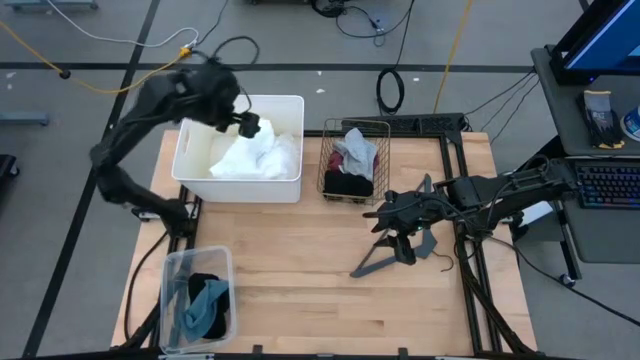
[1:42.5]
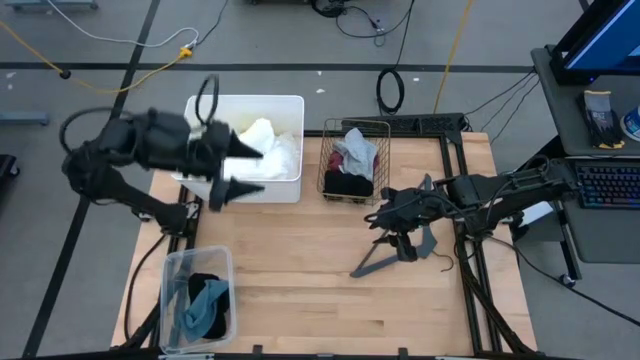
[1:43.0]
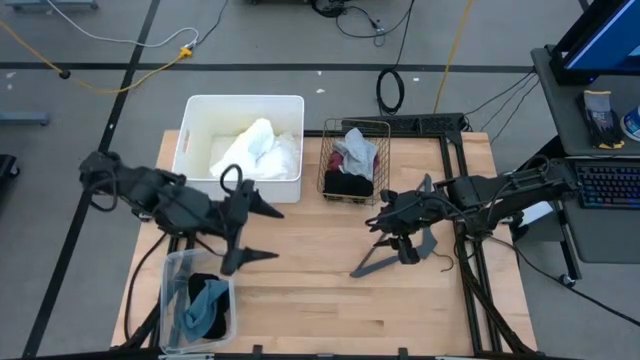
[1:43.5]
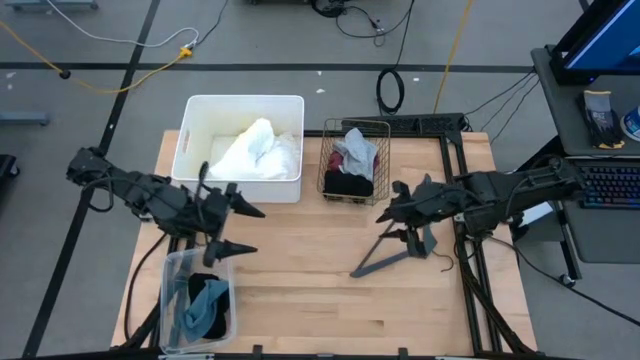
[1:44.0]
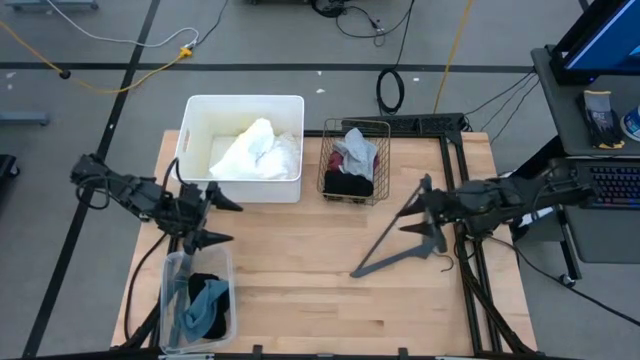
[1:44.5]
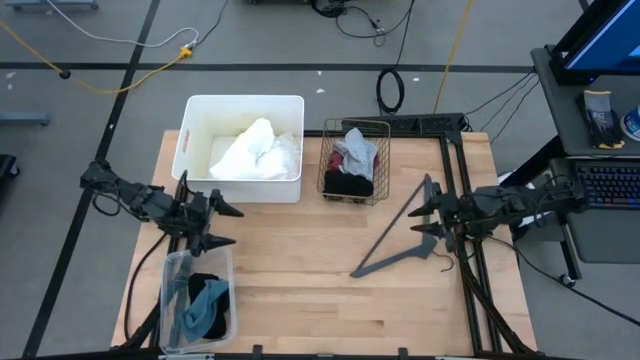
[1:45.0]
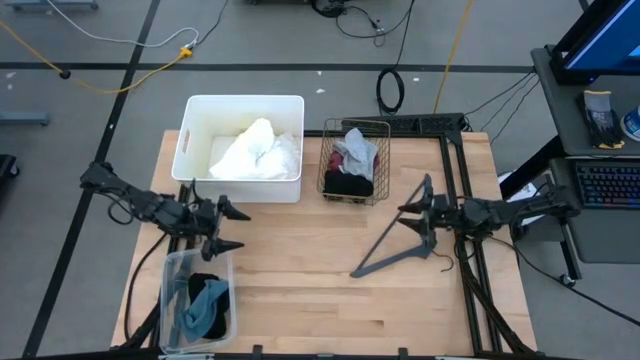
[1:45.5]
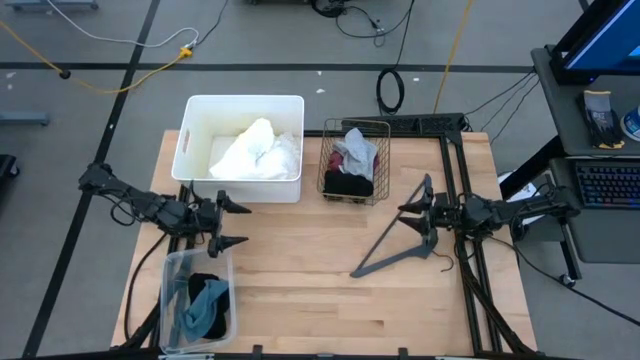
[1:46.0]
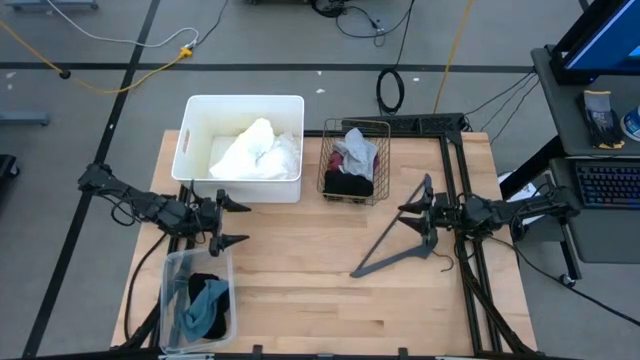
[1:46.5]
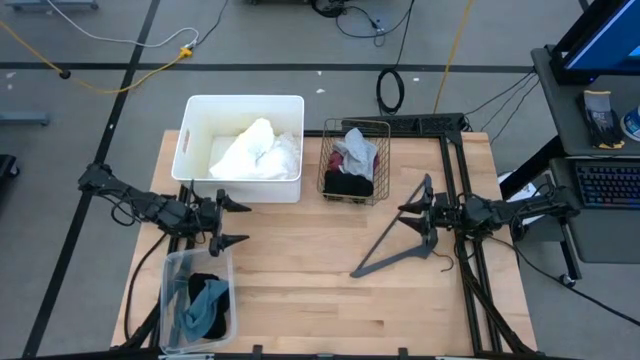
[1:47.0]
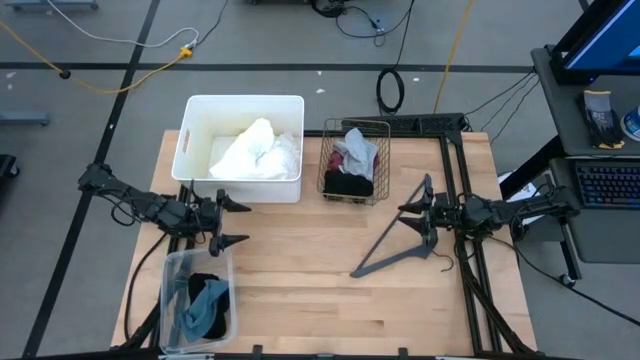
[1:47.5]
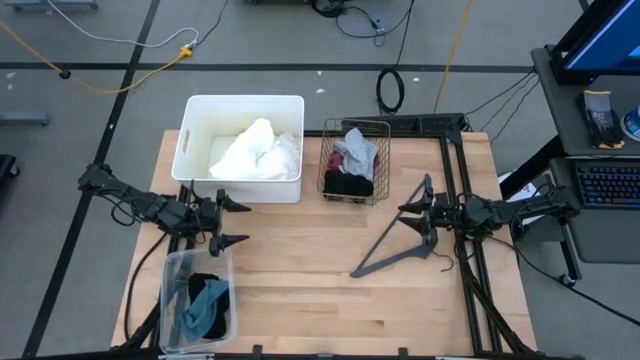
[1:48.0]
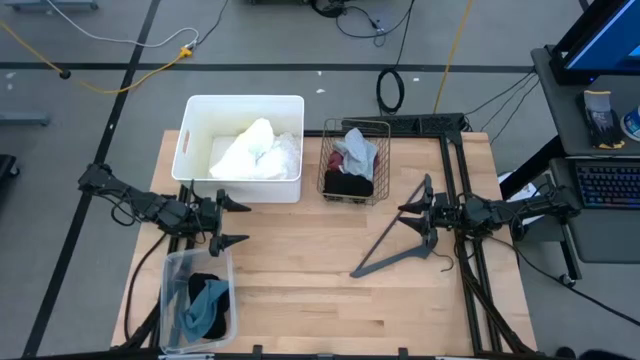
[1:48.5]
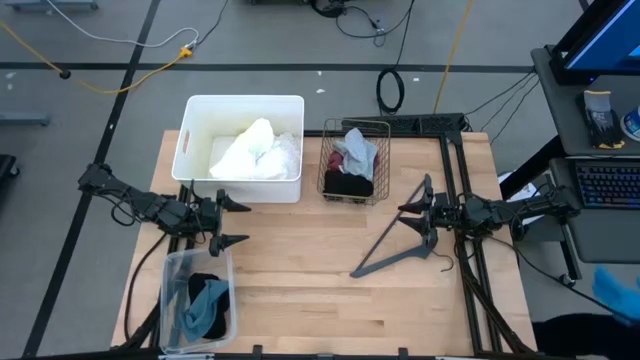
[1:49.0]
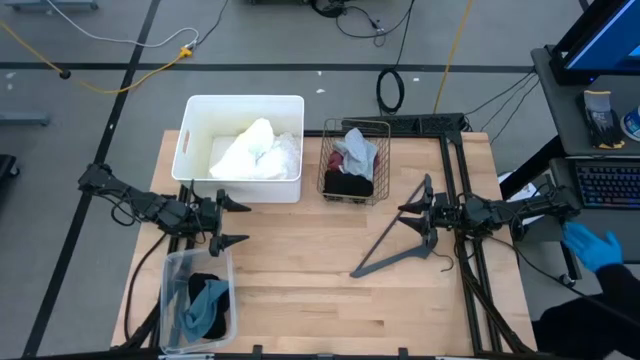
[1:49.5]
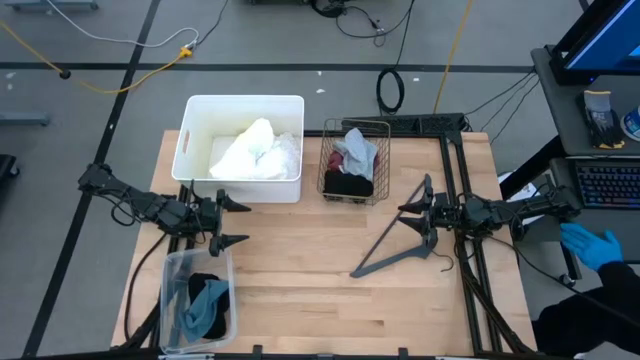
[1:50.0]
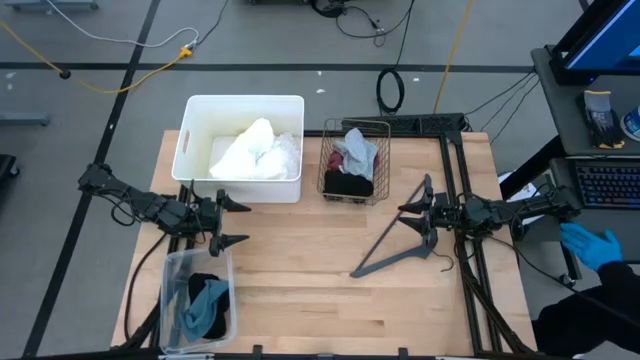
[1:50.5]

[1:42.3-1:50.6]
Task: Pick & Place Cloths
Return to Home Position

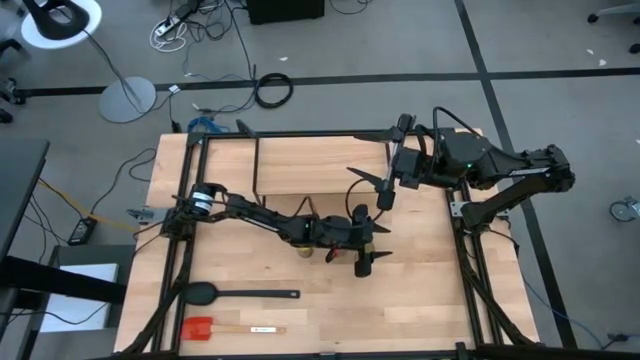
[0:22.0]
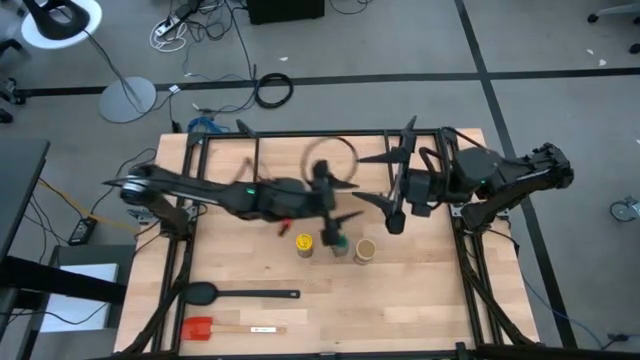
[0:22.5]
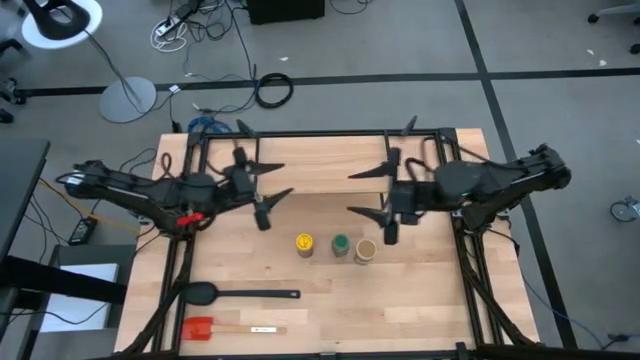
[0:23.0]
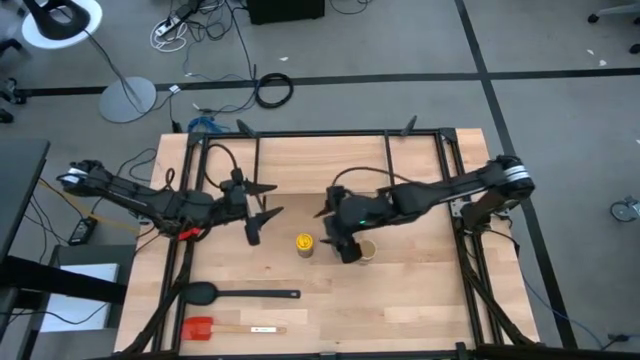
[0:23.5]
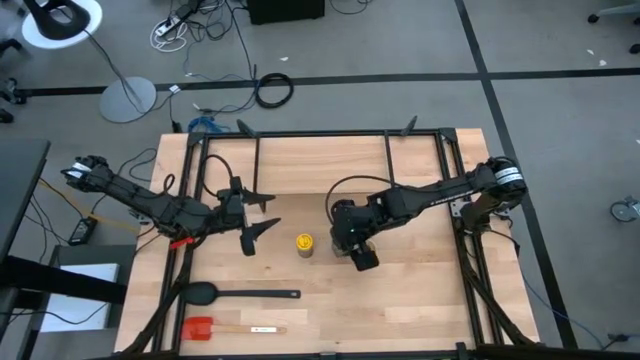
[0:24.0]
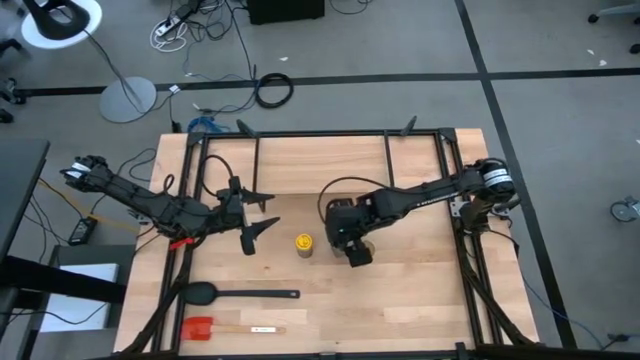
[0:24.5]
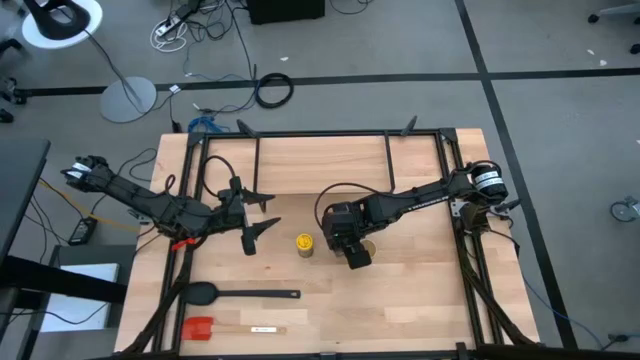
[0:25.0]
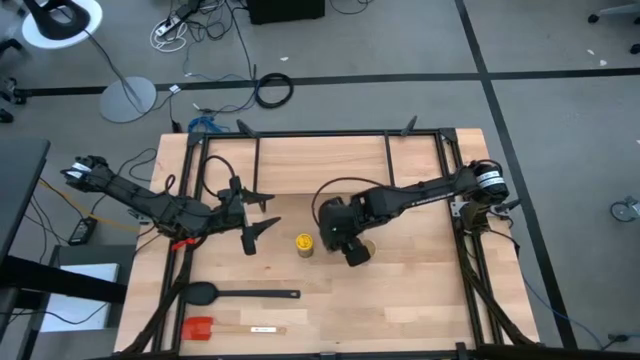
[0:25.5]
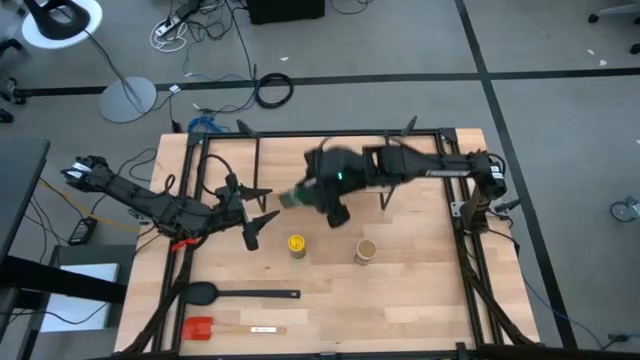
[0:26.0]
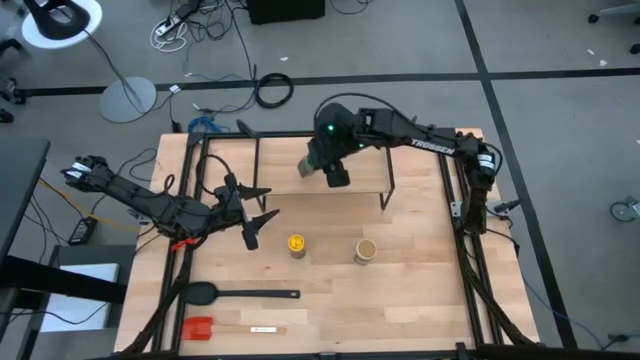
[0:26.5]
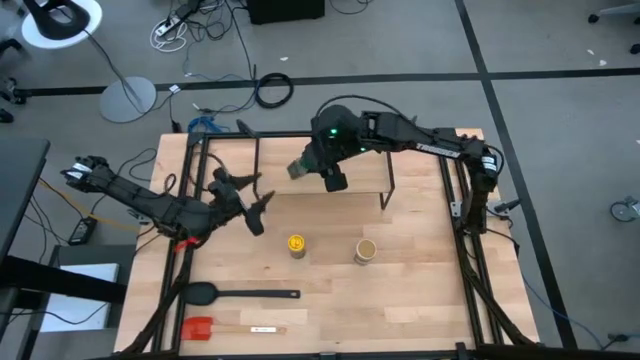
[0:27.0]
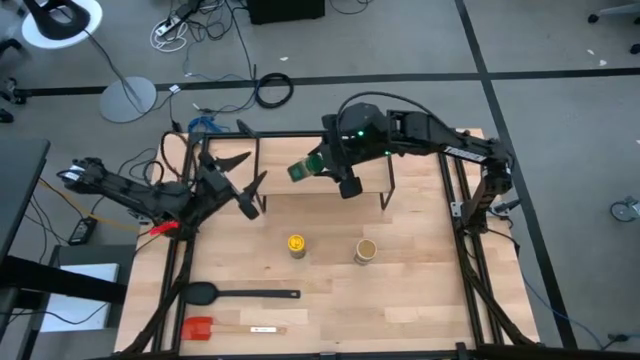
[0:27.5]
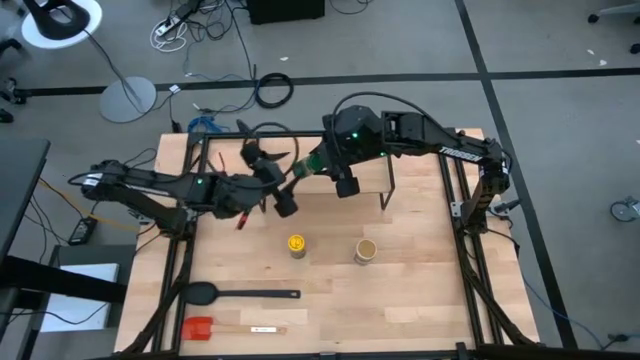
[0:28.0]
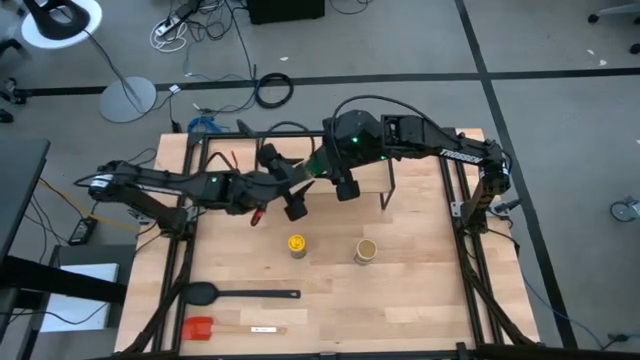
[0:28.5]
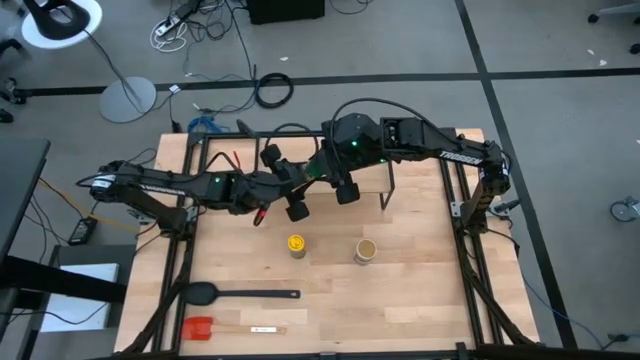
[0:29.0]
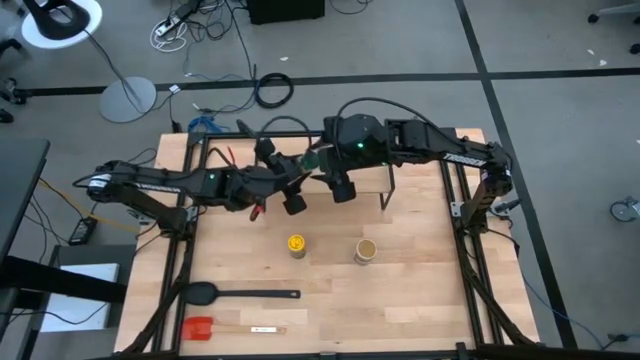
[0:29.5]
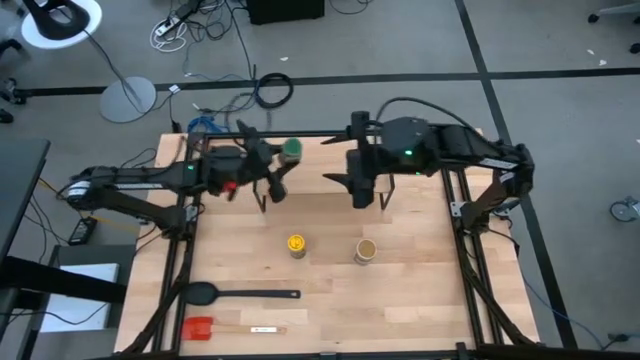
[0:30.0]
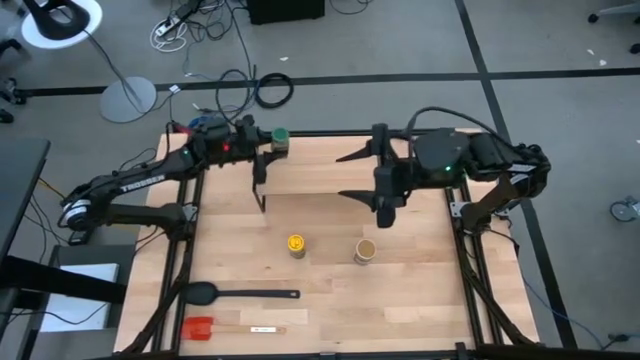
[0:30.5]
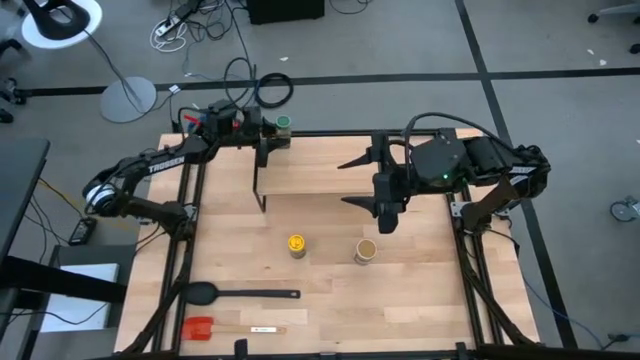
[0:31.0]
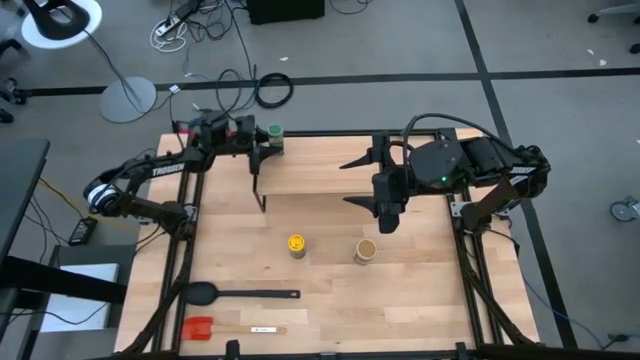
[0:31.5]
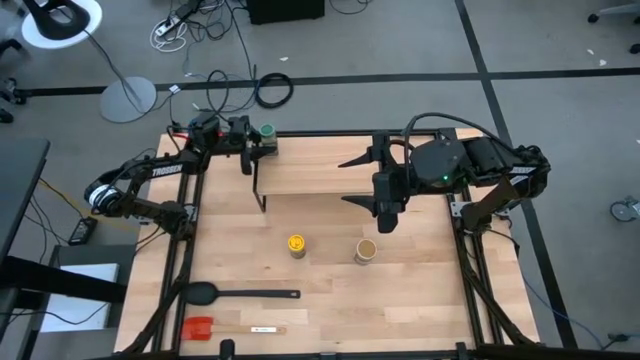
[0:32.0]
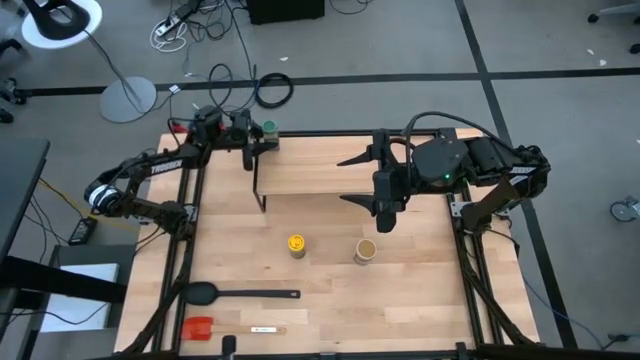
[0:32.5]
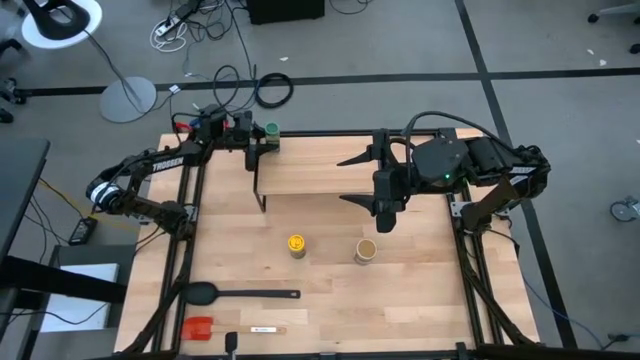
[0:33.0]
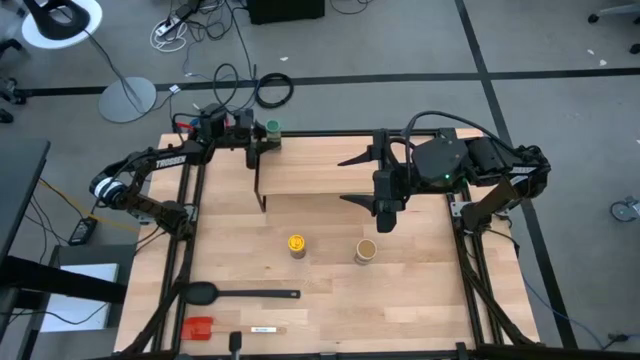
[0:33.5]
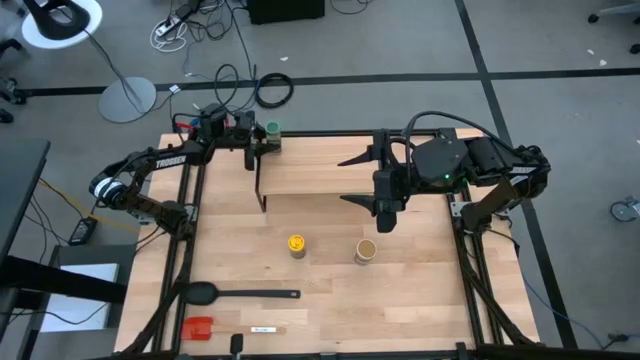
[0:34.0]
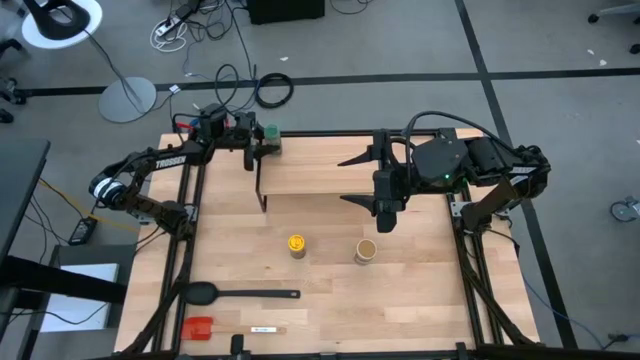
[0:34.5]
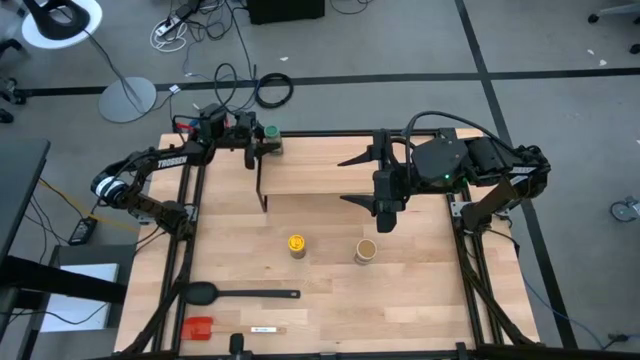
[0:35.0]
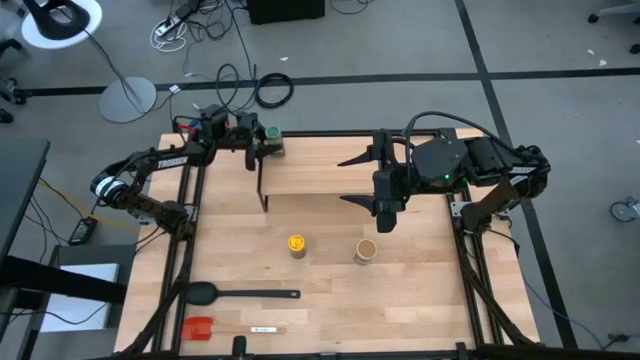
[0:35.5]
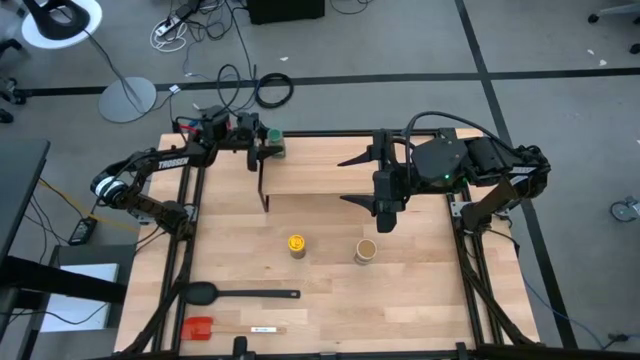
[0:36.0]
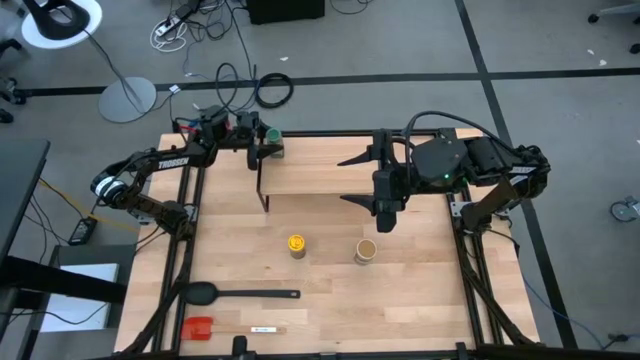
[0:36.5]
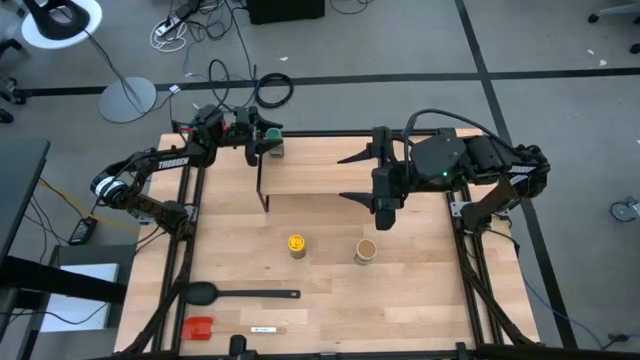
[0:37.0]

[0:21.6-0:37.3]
Task: Shelf spices
Put the green seasoning bottle on the shelf
